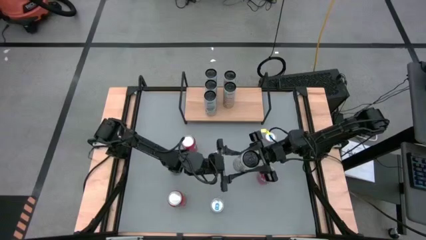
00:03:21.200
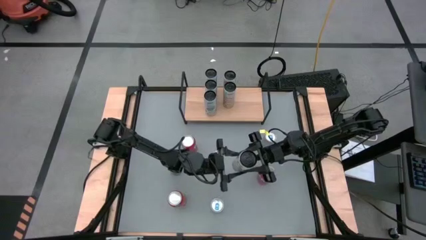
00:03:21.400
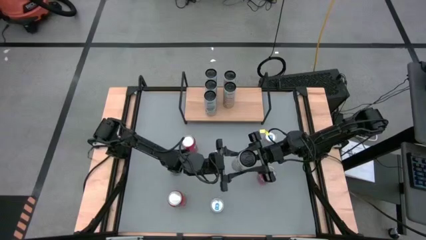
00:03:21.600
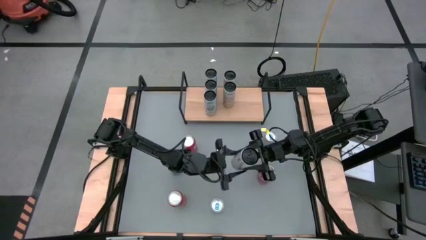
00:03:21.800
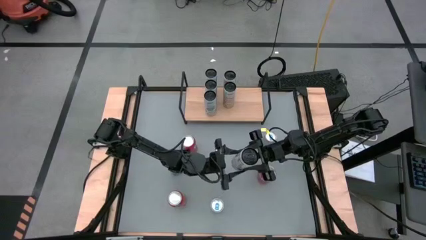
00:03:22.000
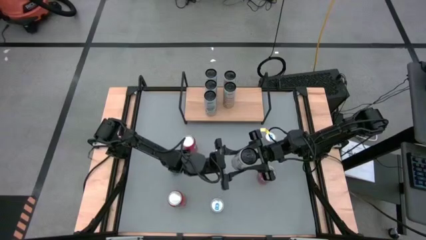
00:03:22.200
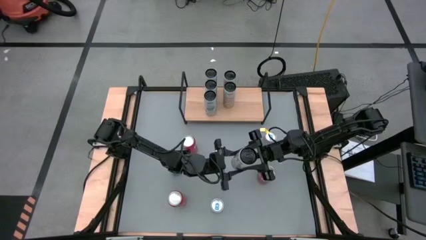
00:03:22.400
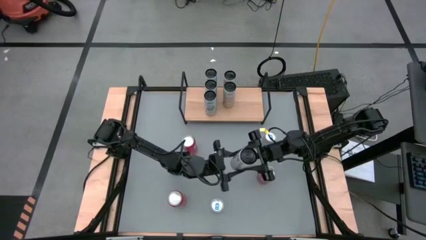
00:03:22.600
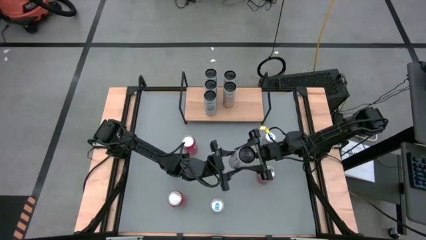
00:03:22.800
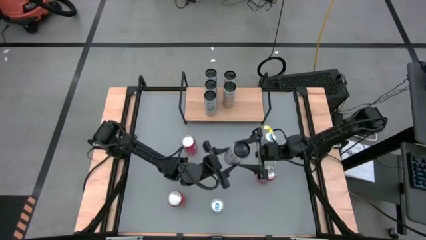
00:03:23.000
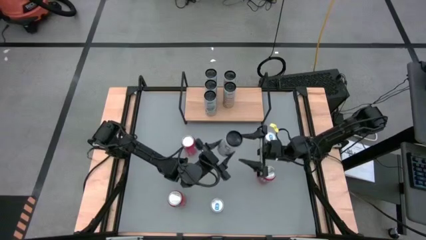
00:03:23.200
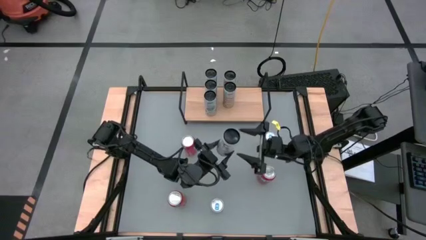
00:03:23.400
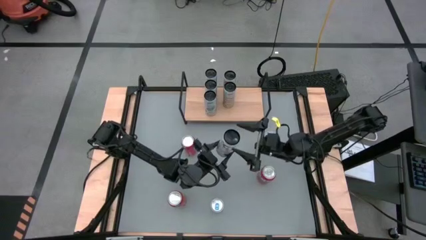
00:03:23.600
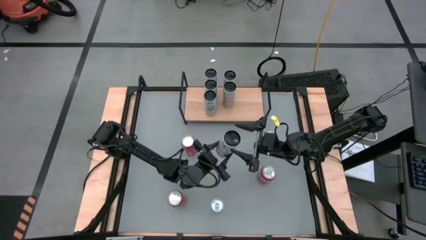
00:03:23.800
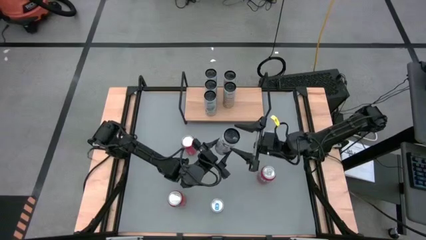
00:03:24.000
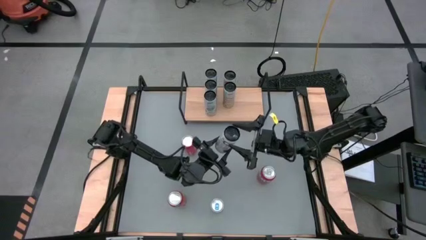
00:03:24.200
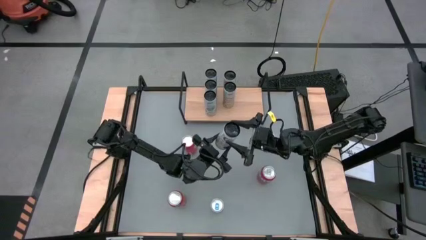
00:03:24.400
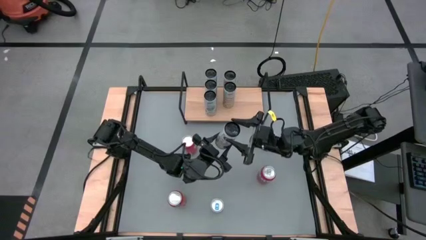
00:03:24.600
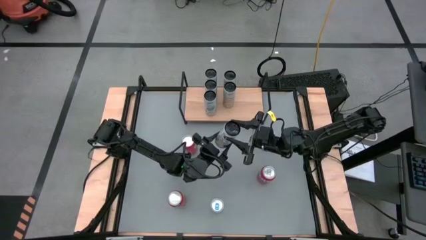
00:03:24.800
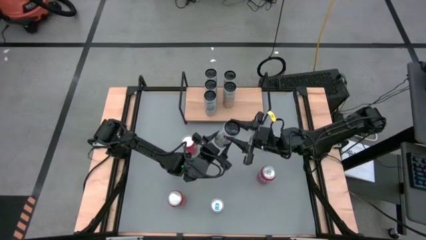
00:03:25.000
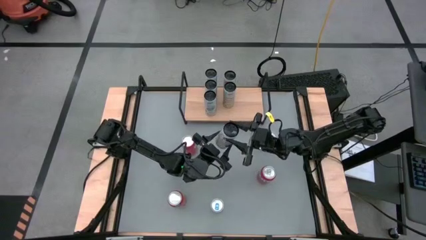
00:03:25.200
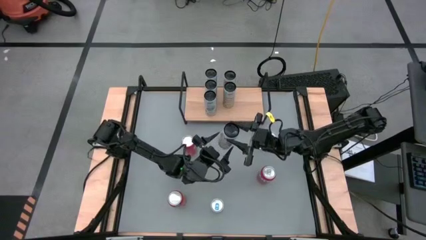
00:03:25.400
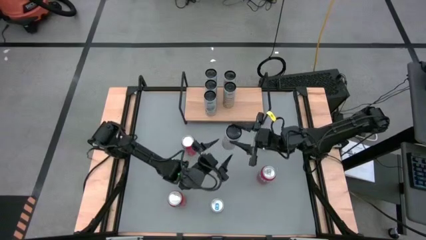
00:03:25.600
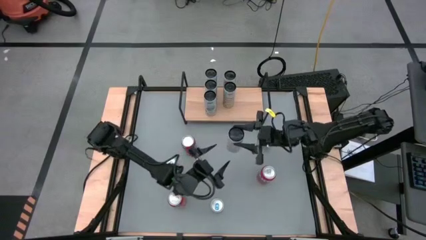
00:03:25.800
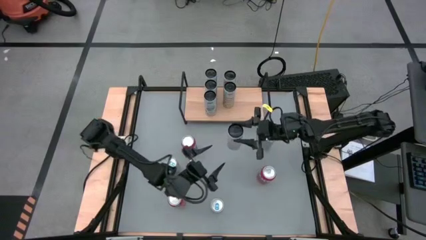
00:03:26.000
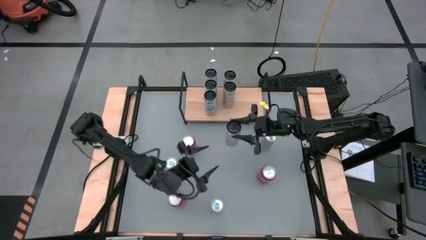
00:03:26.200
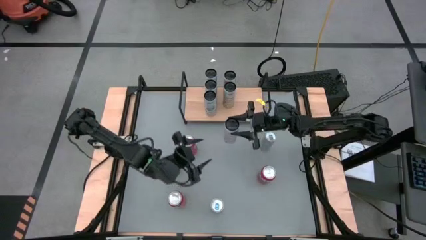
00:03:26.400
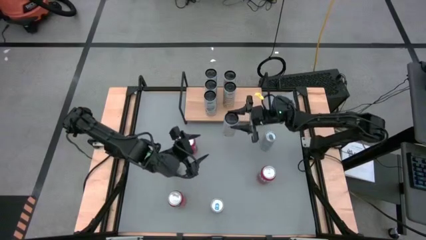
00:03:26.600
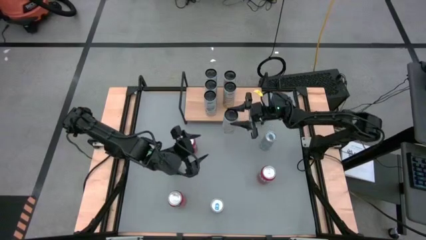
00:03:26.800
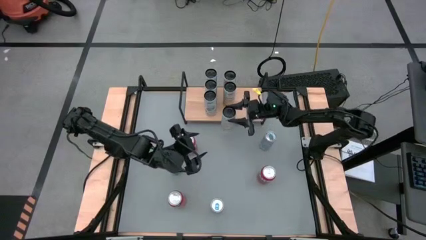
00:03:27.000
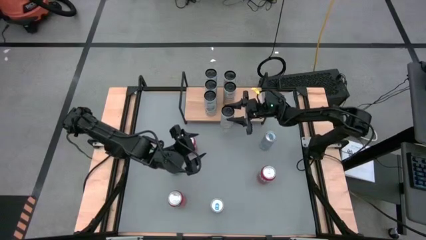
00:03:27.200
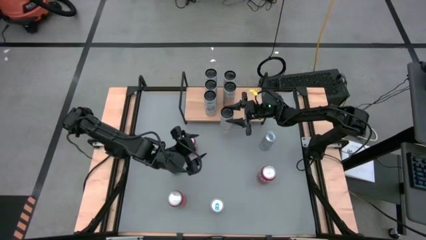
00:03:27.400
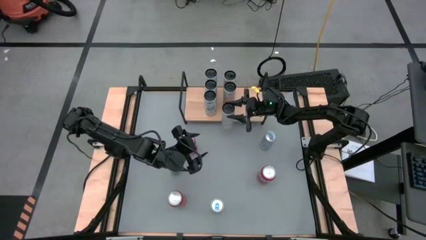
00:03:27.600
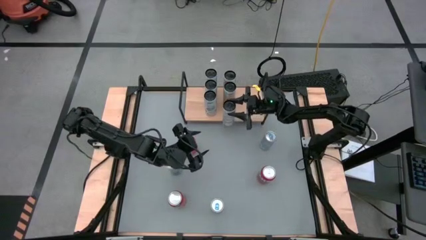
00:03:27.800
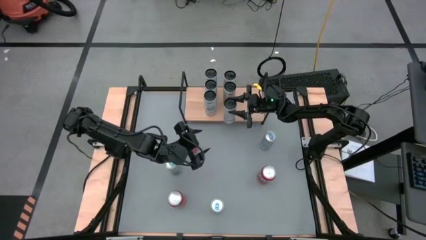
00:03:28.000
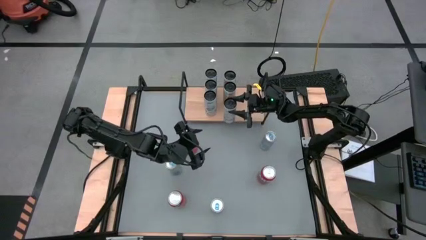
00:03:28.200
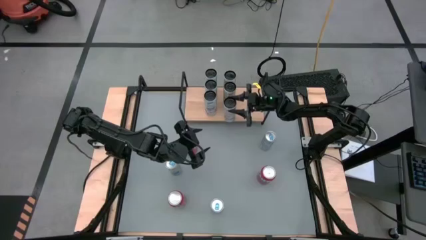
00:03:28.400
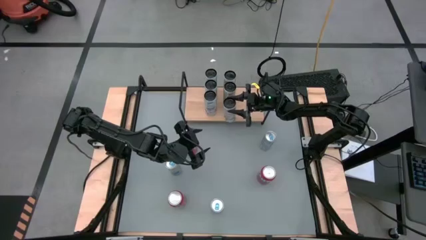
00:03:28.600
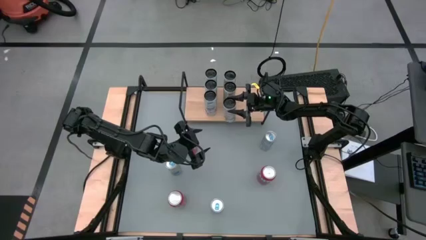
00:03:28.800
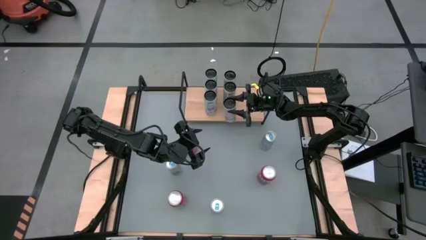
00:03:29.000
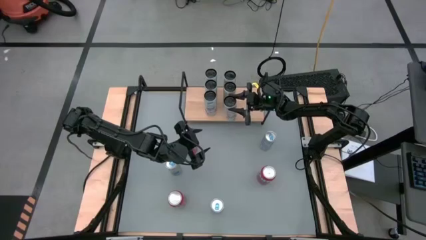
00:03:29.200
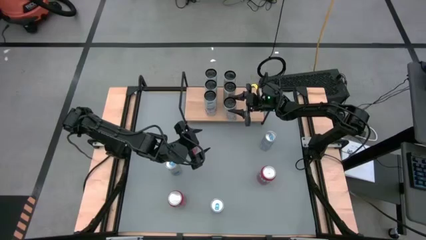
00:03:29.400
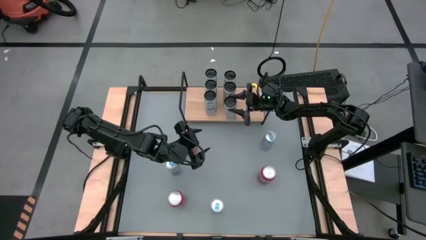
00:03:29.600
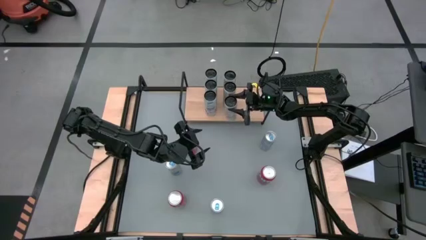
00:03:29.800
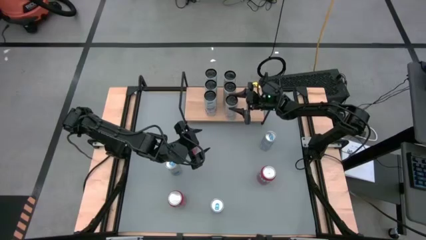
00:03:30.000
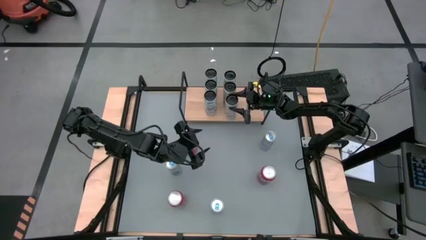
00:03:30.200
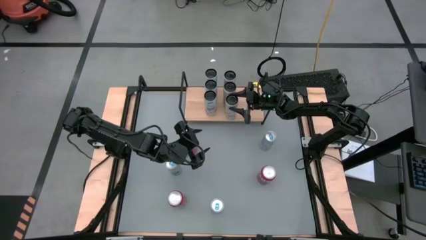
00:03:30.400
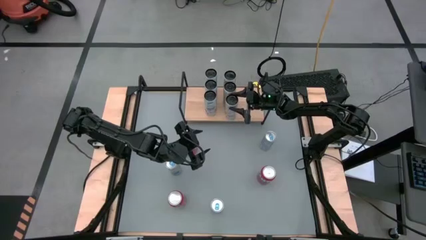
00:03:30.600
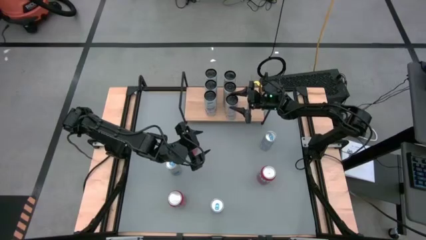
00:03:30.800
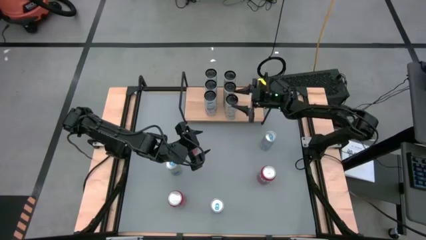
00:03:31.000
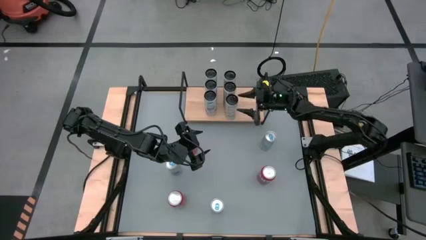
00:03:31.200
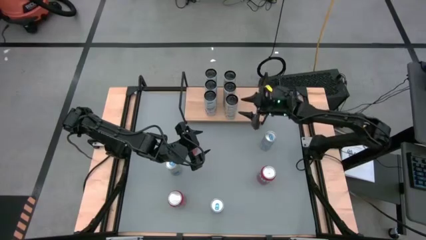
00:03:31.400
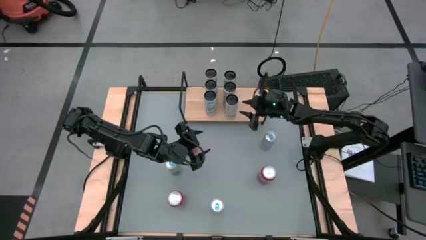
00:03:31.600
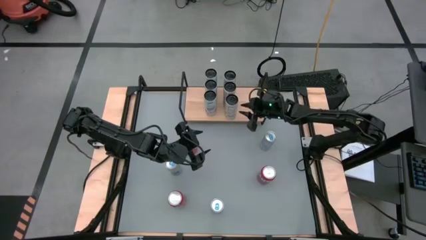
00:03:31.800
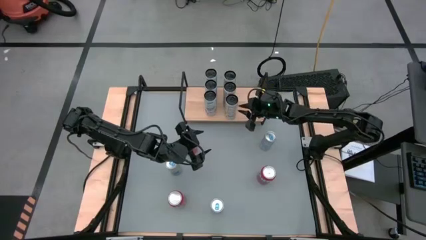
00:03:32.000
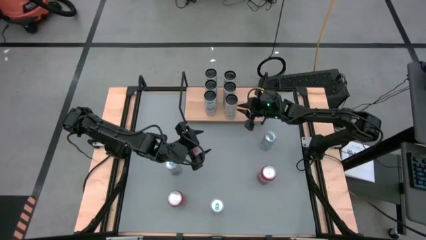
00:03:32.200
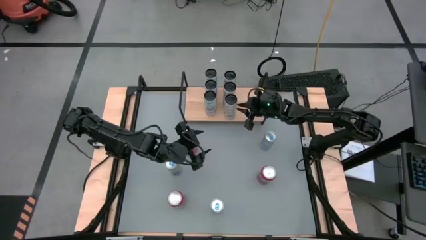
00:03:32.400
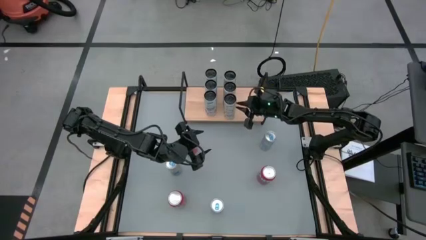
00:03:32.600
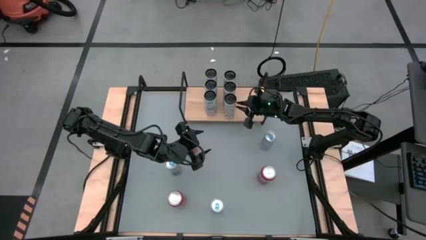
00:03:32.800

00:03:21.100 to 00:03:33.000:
Task: Place canned beverage on shelf
Put the white yellow soda can aligned with the other white yellow soda cans on the shelf
